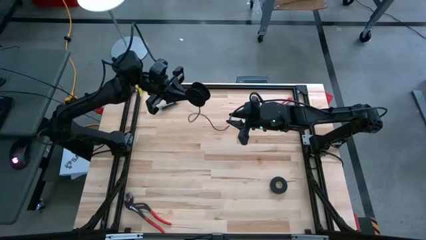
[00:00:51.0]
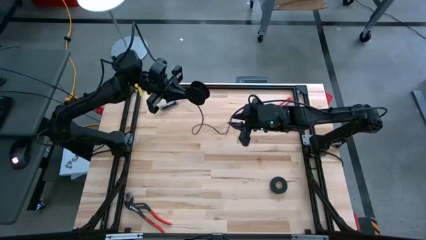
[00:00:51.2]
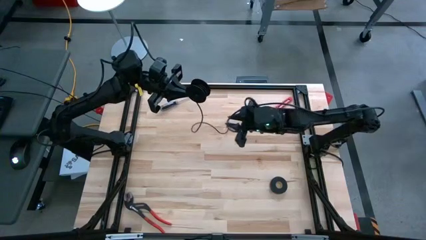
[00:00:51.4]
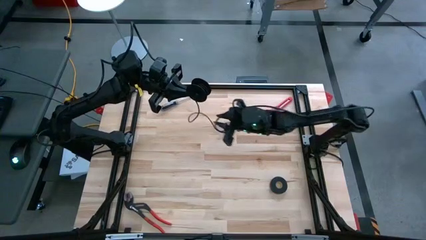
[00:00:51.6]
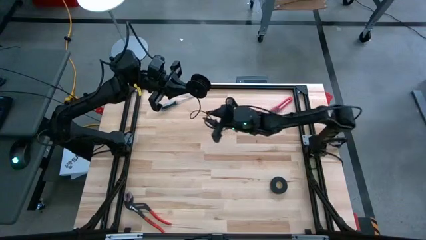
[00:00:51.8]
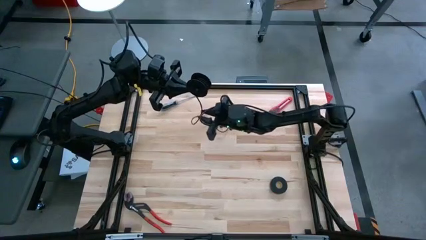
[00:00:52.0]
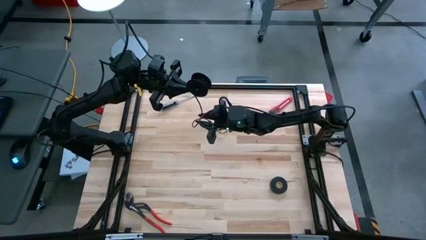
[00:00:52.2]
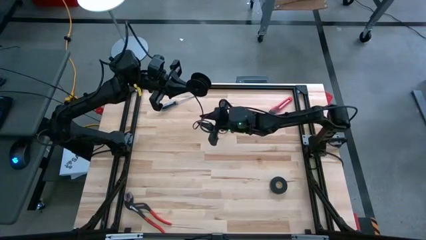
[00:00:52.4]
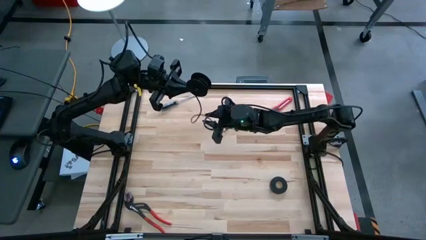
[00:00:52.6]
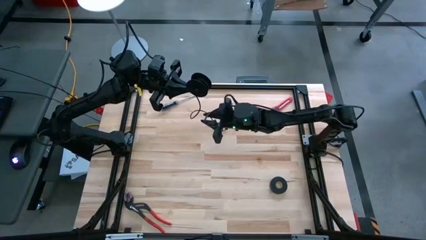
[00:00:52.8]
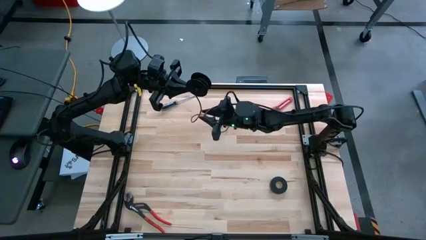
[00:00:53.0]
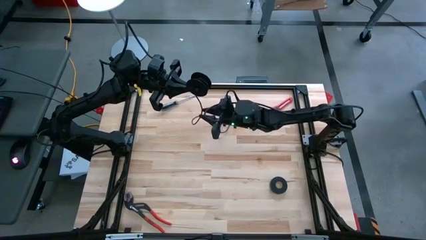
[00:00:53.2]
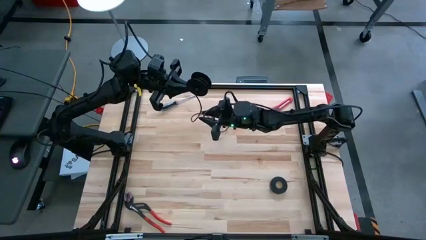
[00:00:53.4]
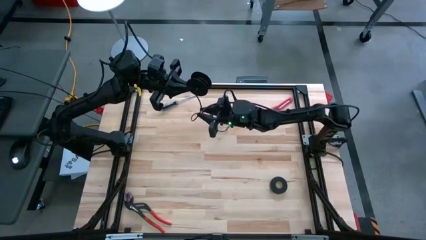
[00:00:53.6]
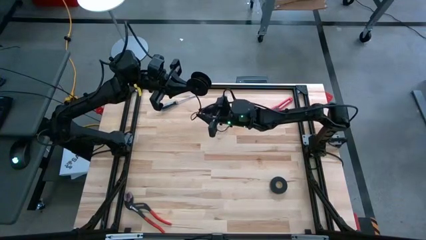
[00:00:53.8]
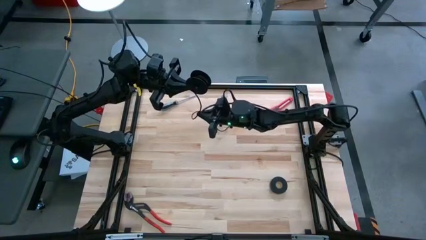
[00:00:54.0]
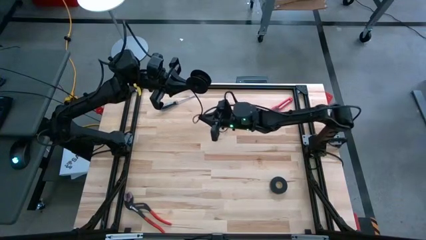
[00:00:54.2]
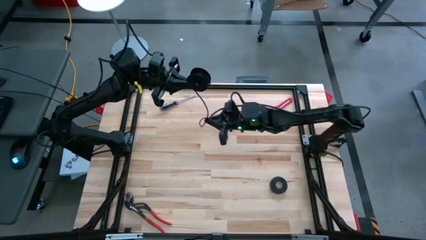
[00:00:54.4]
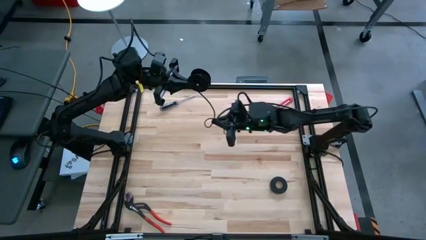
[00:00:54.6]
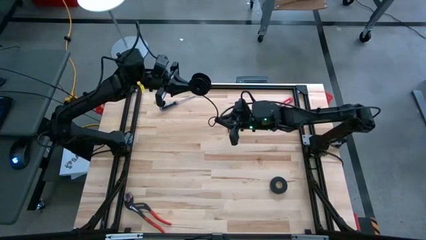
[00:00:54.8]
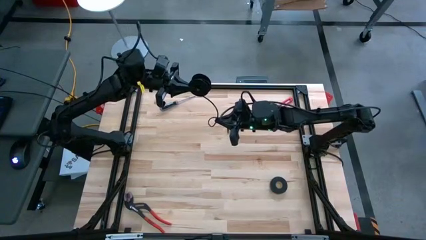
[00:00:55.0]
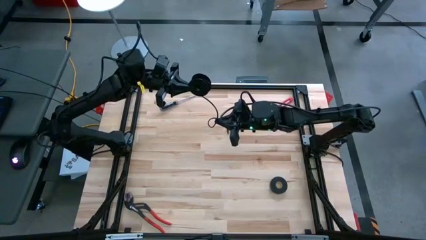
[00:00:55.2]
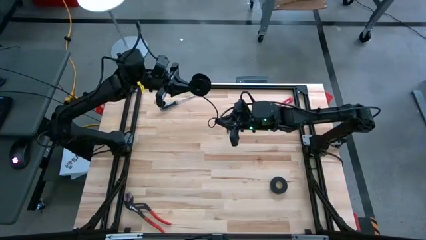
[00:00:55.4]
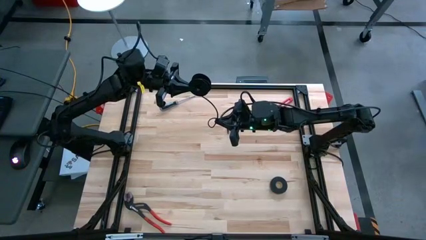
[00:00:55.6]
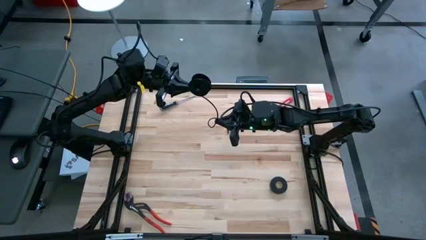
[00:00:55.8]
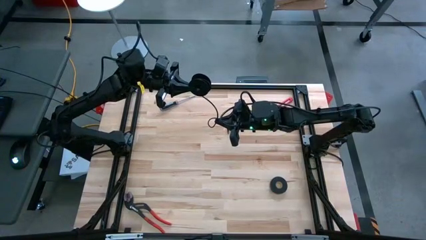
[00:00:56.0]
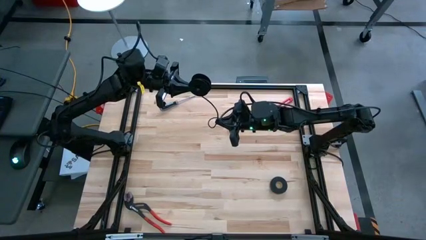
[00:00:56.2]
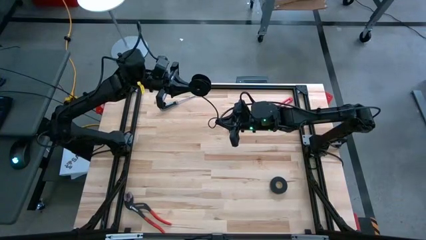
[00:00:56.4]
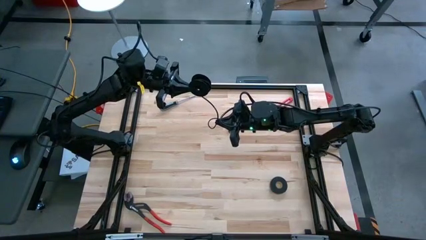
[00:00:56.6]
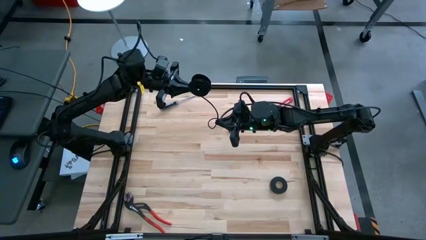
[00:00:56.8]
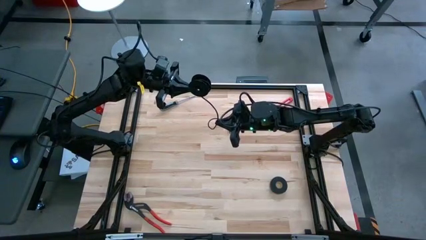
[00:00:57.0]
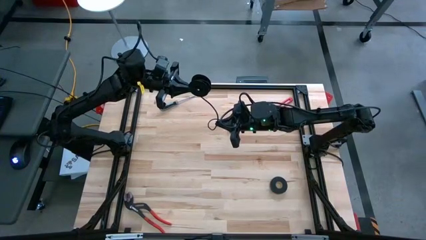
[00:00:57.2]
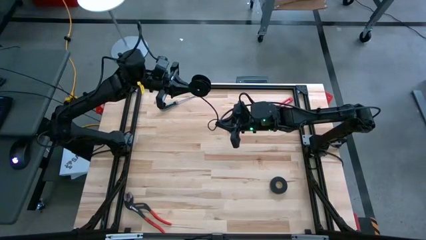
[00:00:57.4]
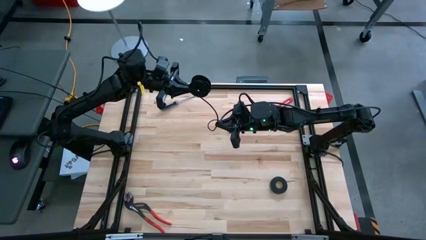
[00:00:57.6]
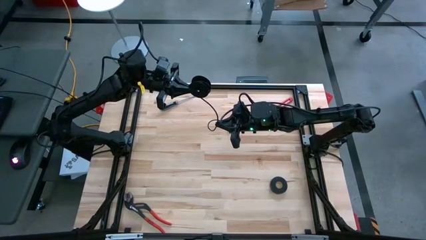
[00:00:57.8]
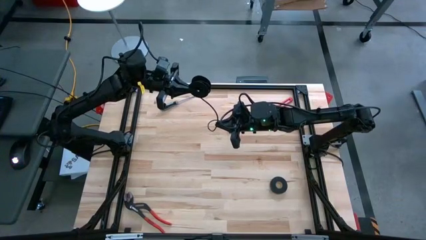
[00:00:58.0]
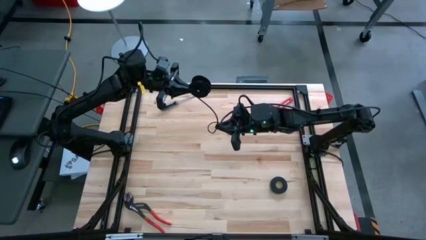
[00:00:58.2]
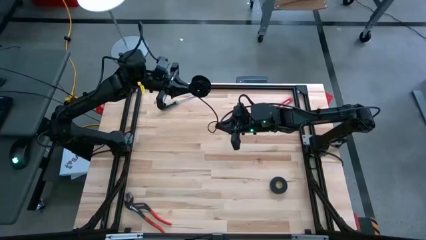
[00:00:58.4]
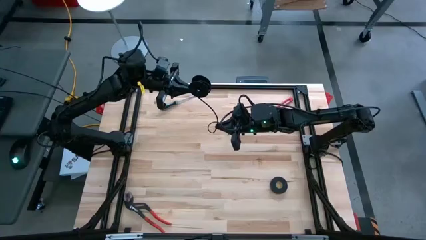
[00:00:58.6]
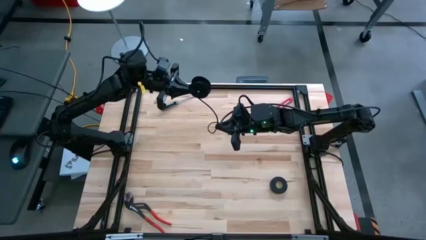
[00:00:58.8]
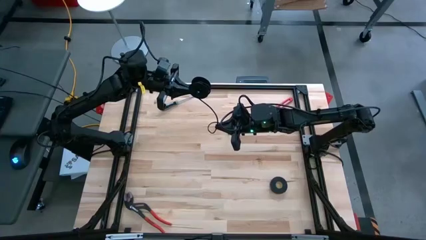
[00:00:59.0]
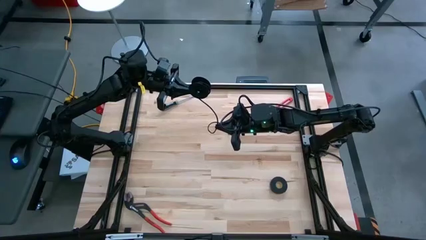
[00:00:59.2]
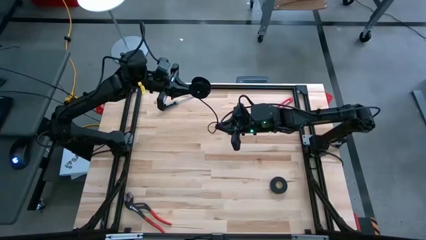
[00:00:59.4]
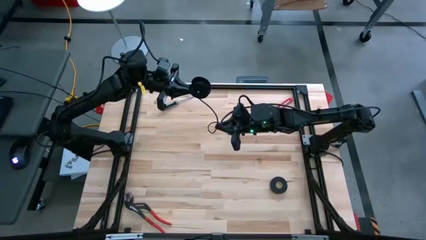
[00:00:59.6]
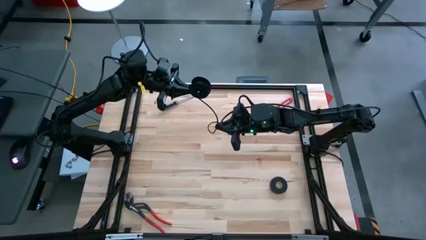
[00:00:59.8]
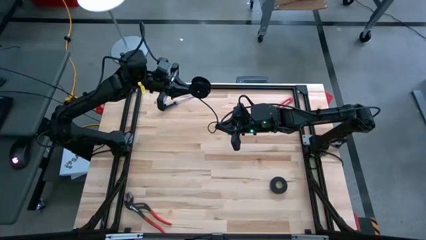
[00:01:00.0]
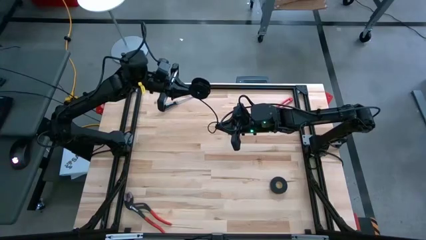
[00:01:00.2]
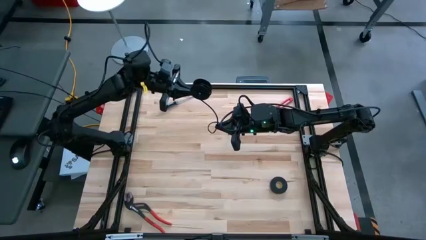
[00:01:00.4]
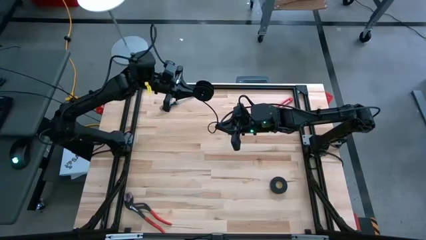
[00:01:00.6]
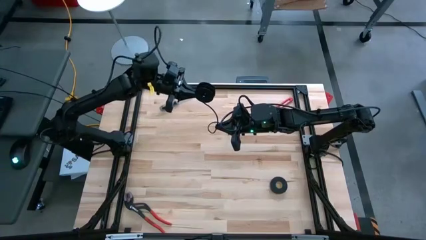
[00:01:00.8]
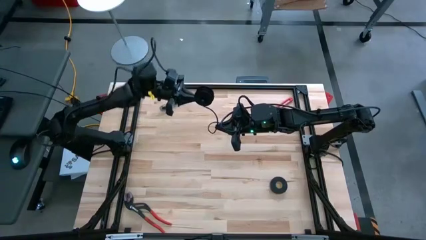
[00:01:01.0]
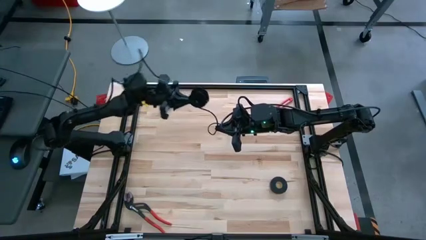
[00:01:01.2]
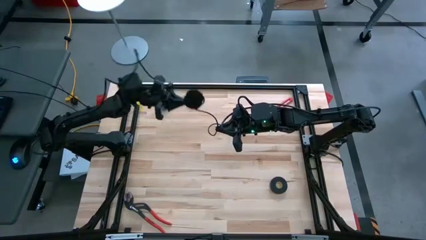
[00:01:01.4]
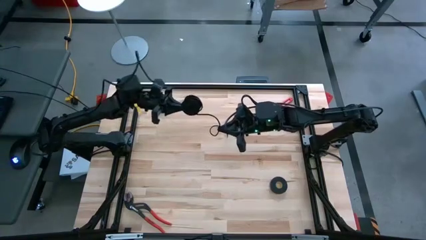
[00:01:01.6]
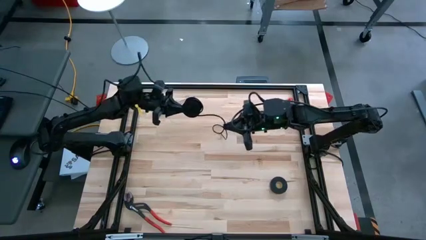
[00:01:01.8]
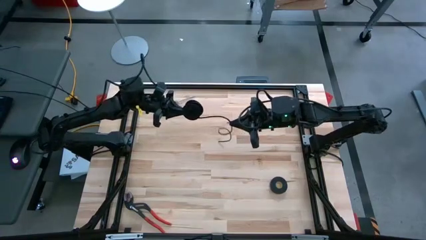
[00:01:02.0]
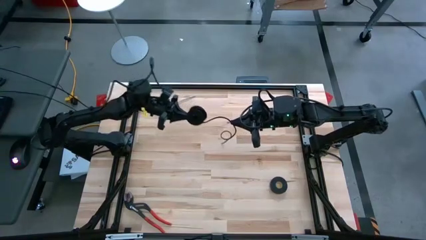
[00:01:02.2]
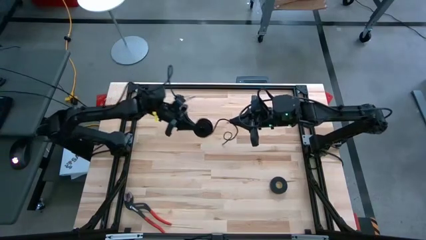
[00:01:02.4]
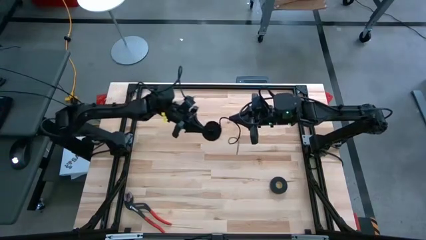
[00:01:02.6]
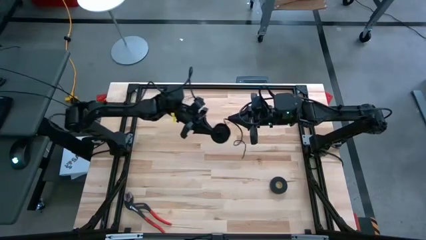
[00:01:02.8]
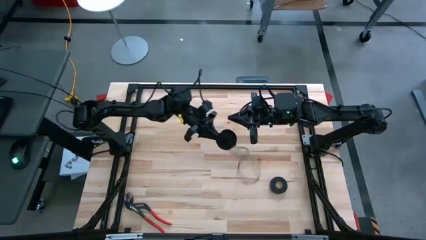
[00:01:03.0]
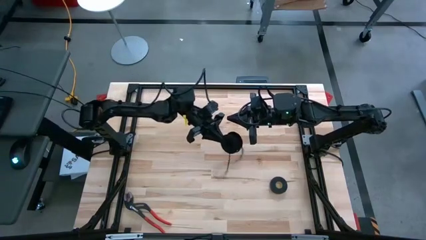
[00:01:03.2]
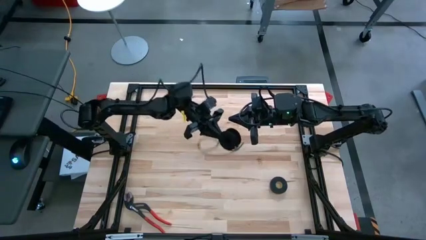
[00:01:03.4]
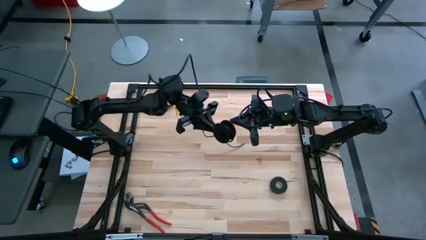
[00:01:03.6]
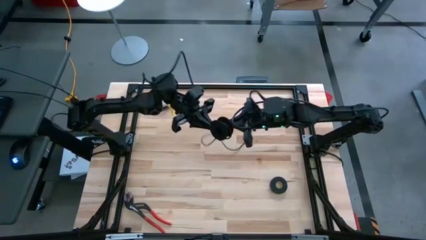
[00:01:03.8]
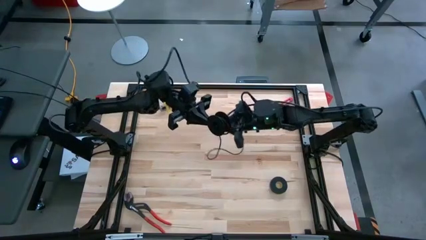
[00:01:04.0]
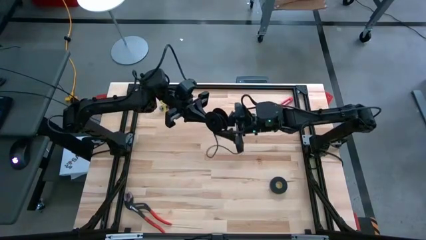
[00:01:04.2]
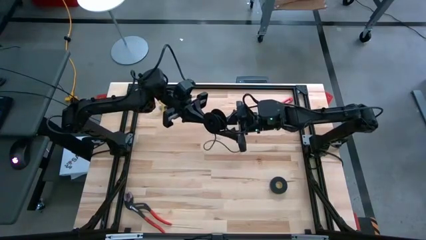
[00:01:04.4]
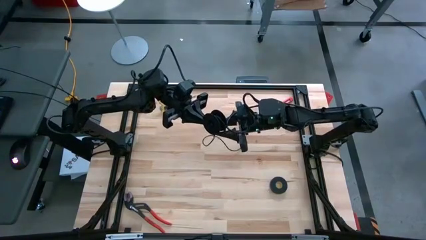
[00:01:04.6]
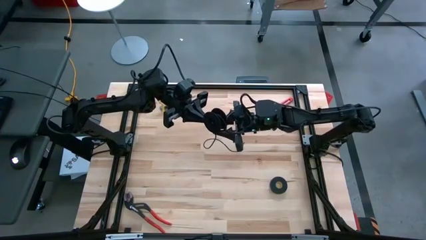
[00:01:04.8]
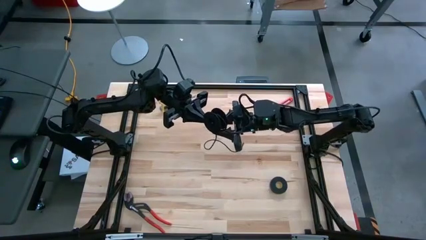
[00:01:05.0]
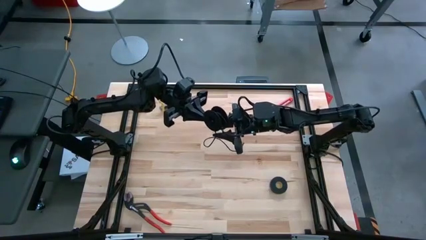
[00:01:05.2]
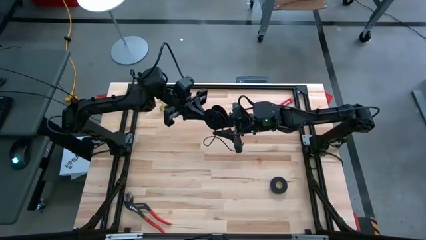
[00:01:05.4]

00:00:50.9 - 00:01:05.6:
Task: Coil cords
Coil the black wire on the black spool

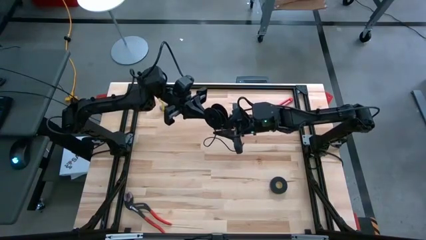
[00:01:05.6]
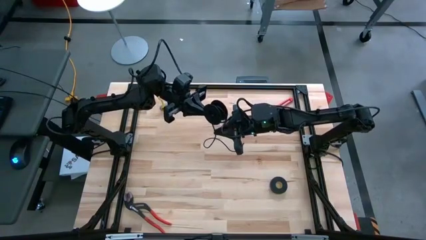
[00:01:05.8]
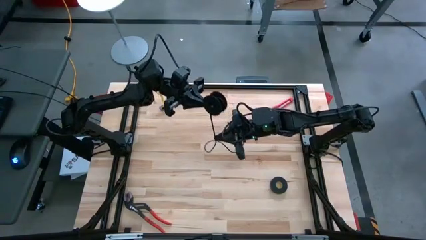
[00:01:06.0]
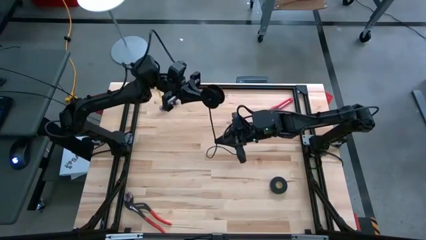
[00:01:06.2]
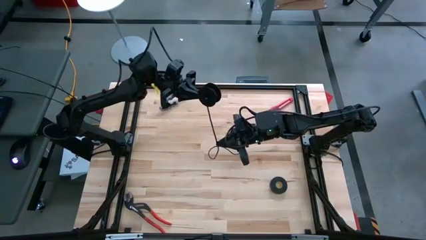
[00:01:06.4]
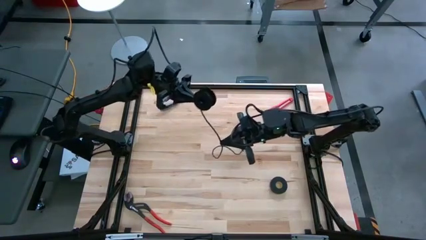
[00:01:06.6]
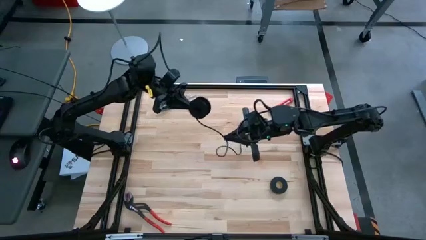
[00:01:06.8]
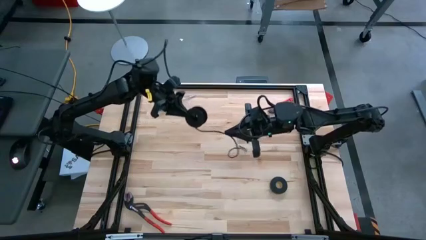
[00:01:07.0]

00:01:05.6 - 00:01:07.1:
Coil the black wire on the black spool
